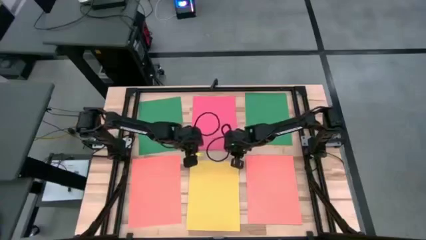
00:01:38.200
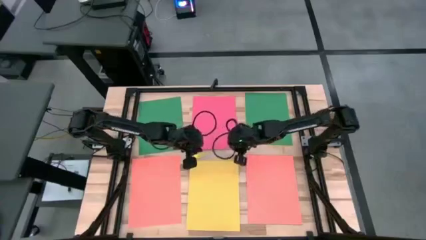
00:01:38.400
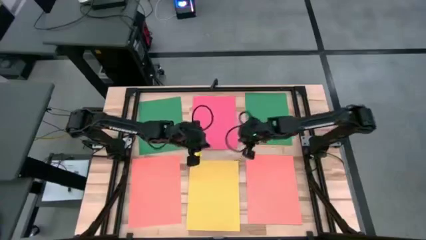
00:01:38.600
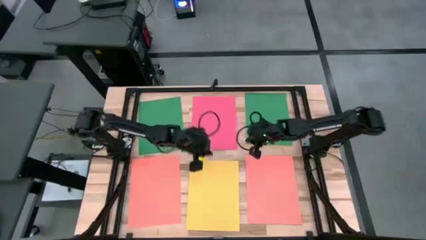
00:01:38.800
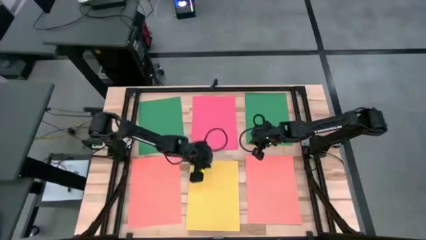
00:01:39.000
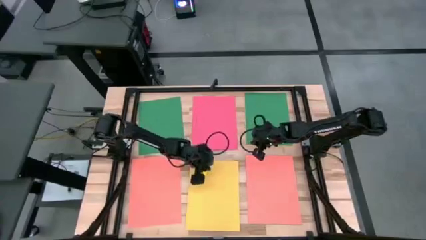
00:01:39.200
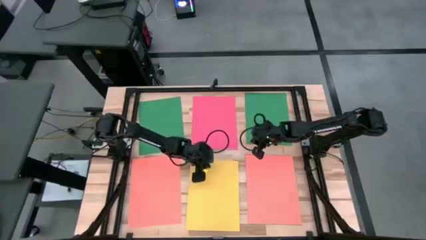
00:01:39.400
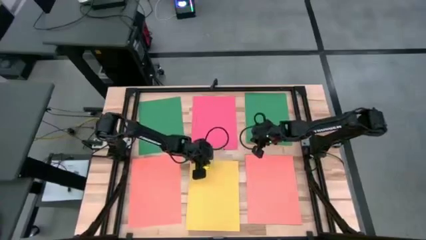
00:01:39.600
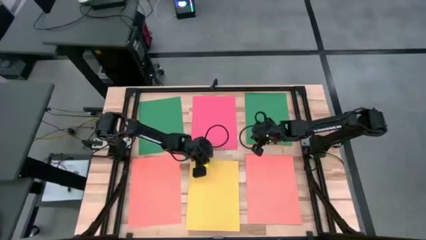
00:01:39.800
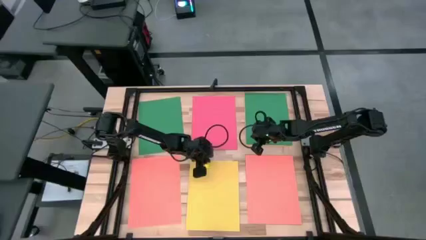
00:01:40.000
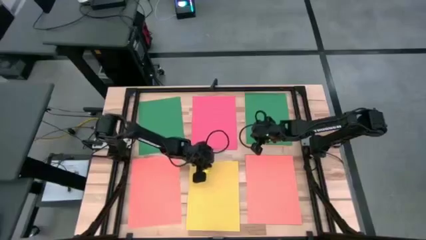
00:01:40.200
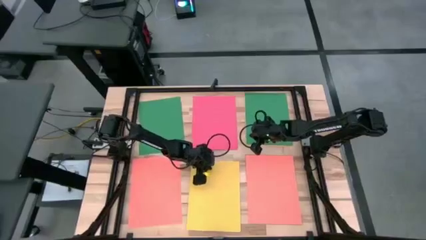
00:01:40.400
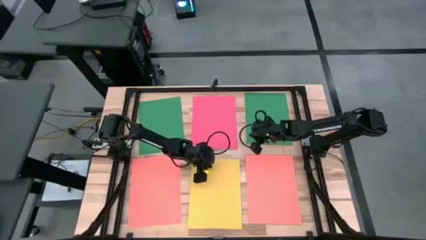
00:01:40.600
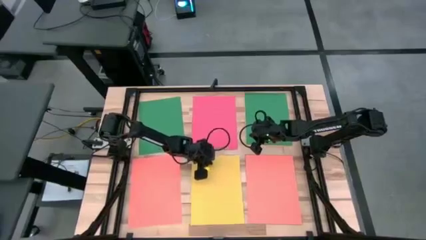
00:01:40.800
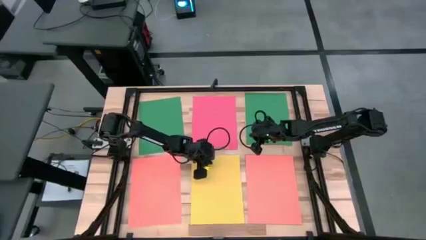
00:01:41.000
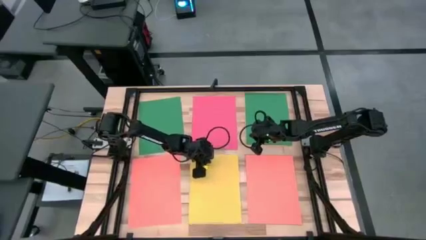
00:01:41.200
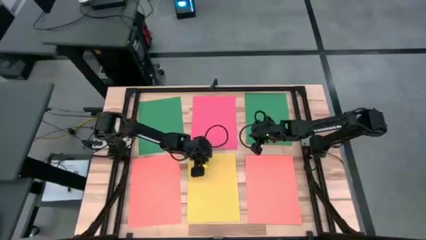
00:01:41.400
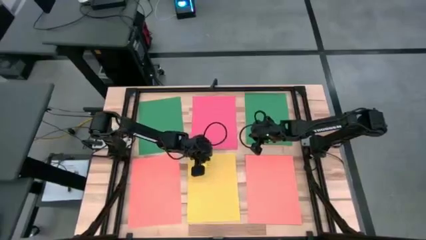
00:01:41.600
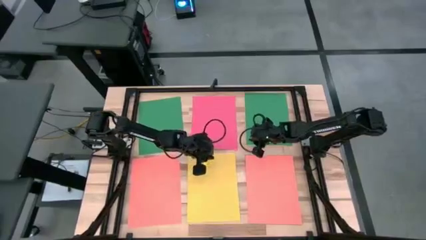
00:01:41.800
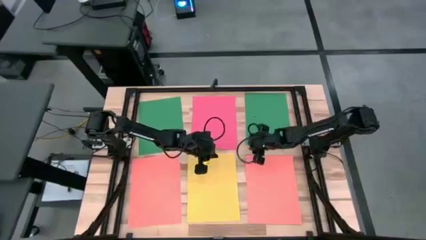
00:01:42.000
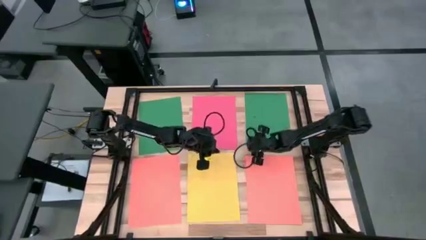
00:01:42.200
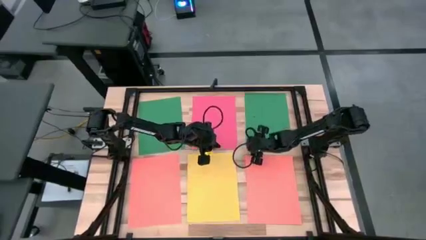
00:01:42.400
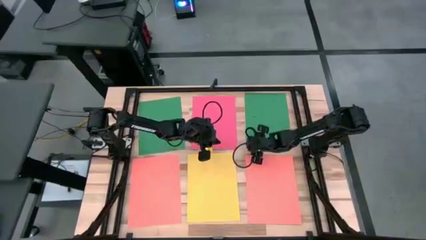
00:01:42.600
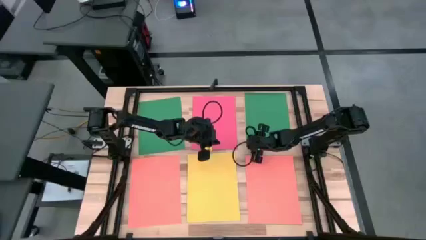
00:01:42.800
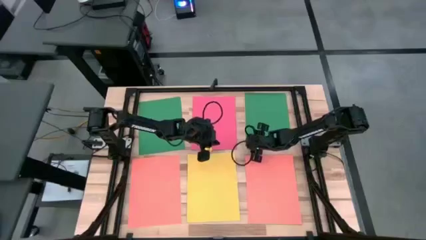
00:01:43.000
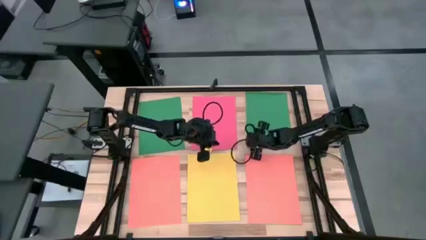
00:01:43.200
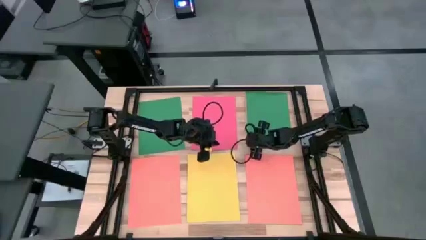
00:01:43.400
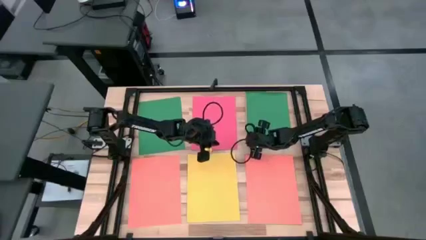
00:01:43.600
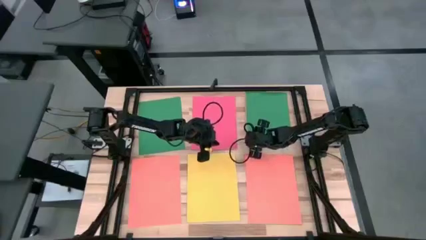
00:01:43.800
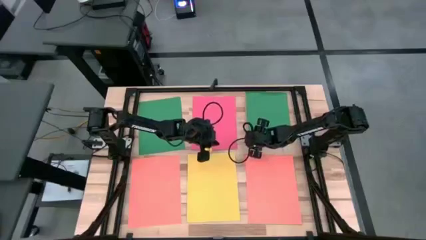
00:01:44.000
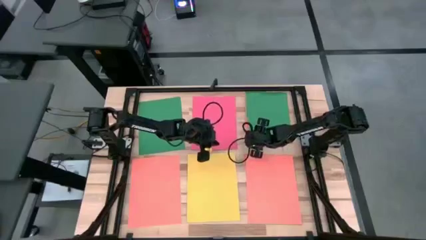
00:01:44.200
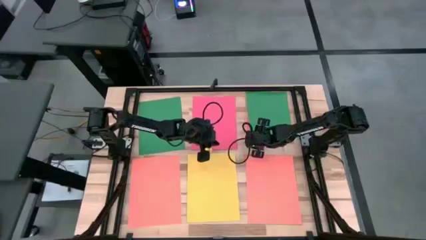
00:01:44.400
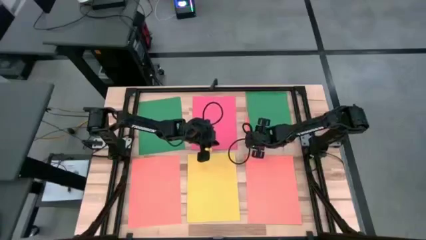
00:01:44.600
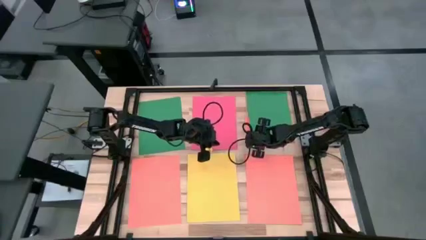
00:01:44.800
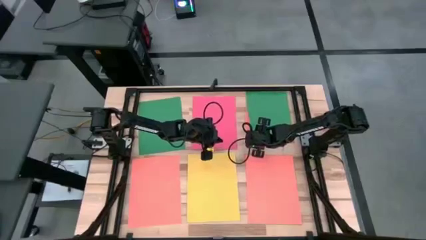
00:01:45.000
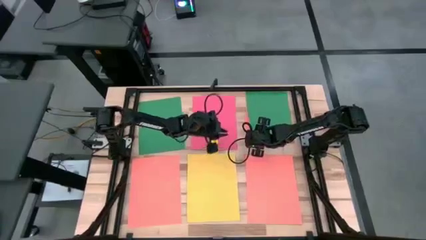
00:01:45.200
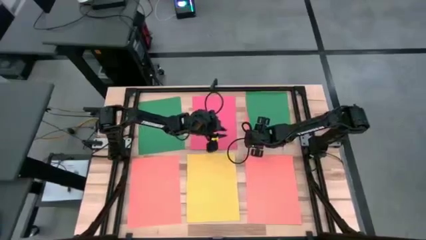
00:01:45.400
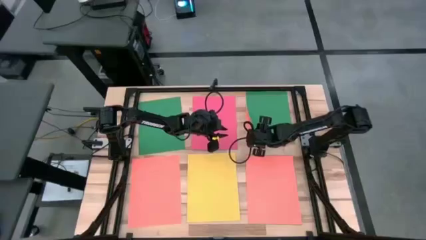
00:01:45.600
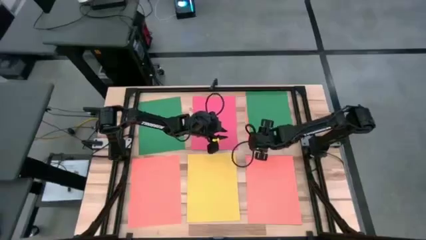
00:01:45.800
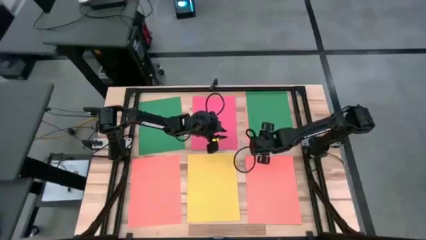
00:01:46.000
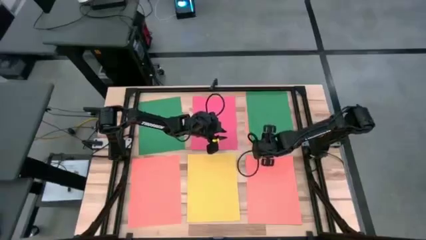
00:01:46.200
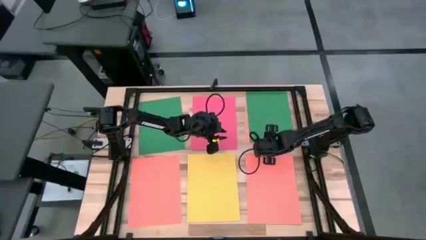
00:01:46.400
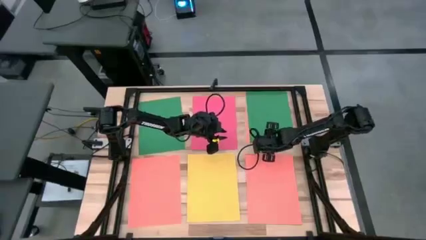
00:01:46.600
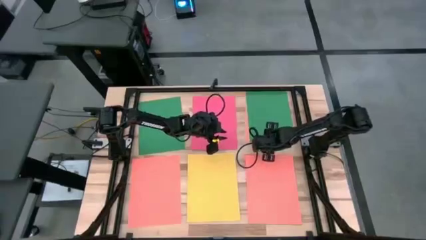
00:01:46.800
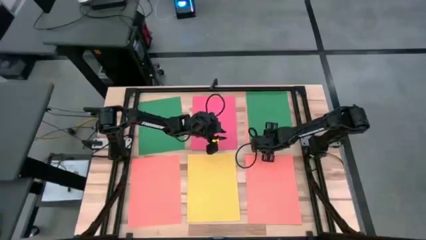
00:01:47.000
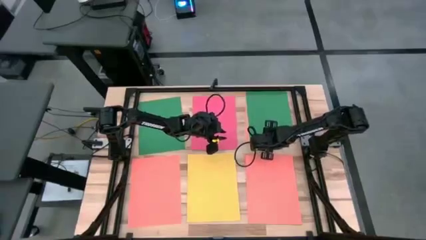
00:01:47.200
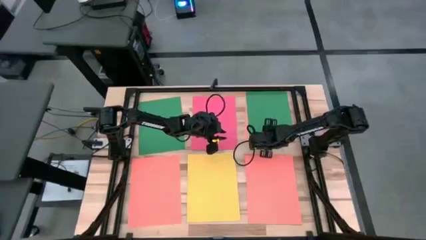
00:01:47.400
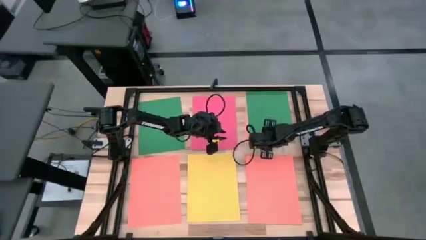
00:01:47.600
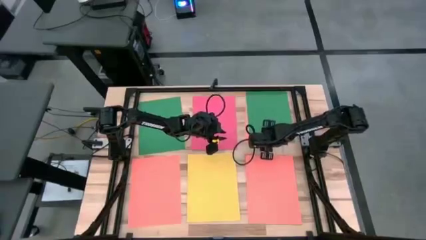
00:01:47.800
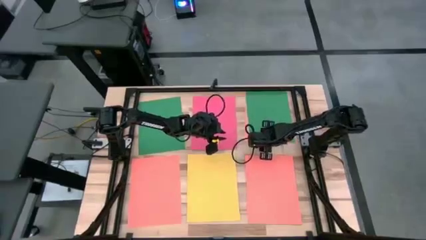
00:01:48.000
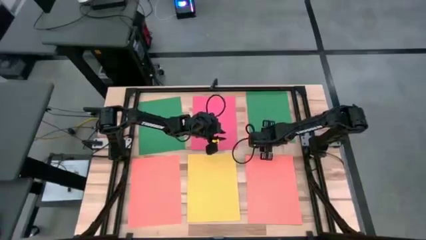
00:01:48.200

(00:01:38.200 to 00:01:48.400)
Task: Organize paper
Stack the green paper on top of the green paper
